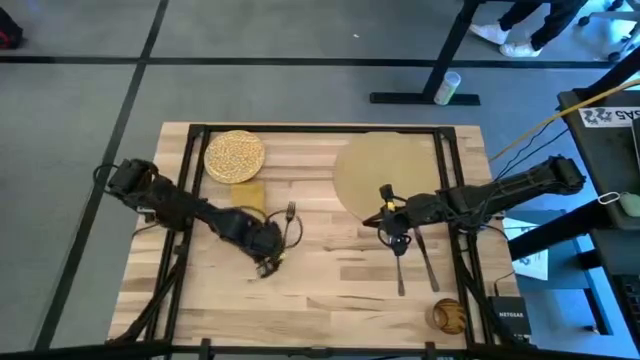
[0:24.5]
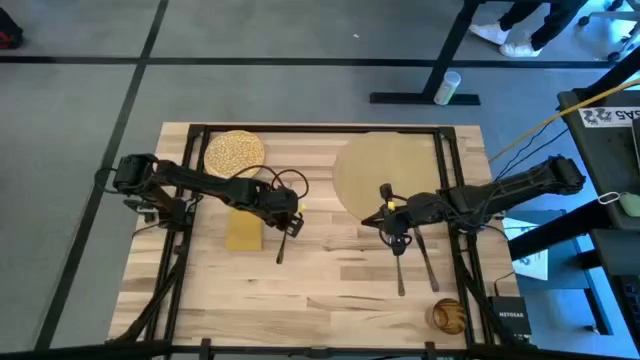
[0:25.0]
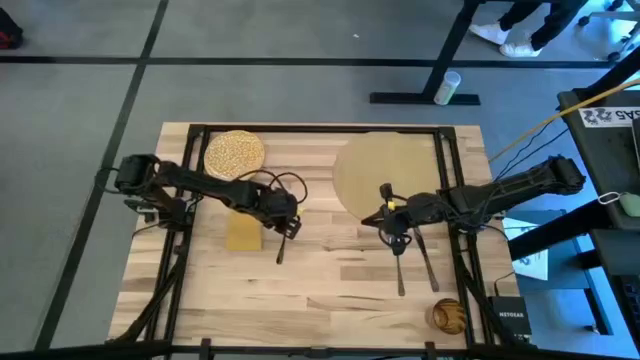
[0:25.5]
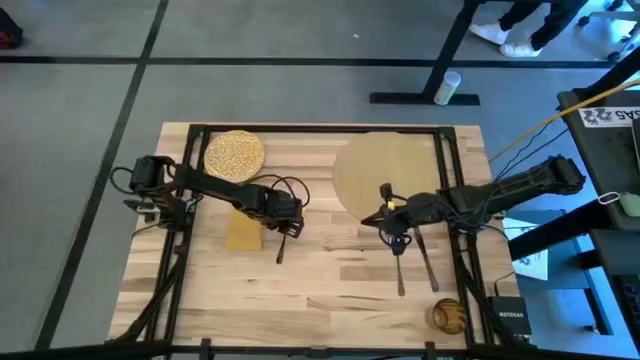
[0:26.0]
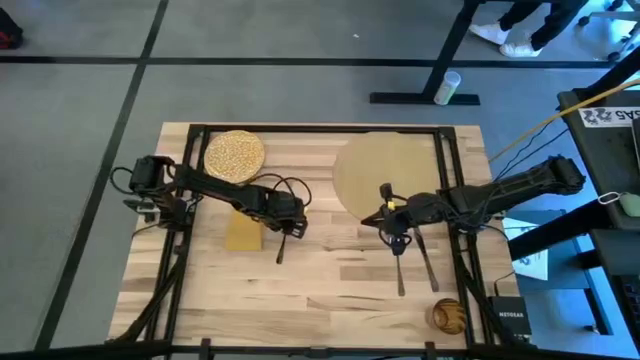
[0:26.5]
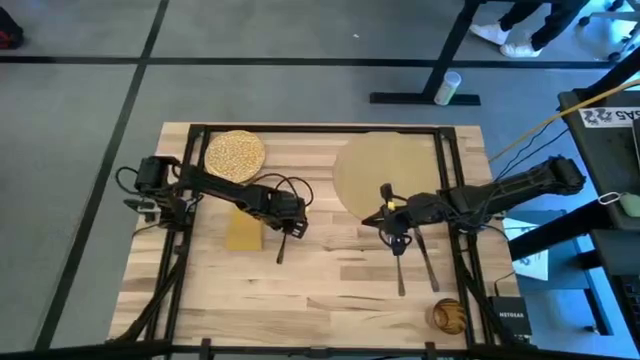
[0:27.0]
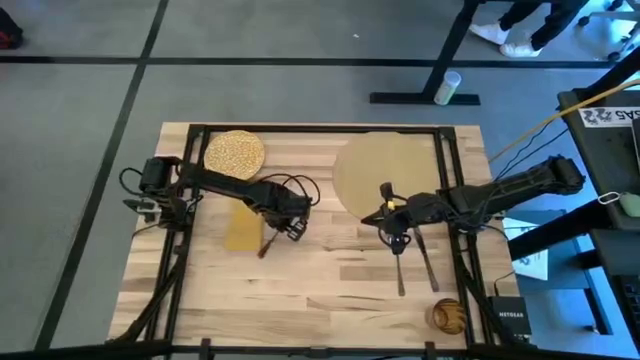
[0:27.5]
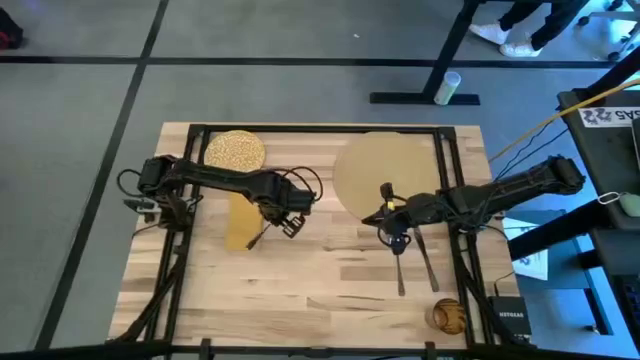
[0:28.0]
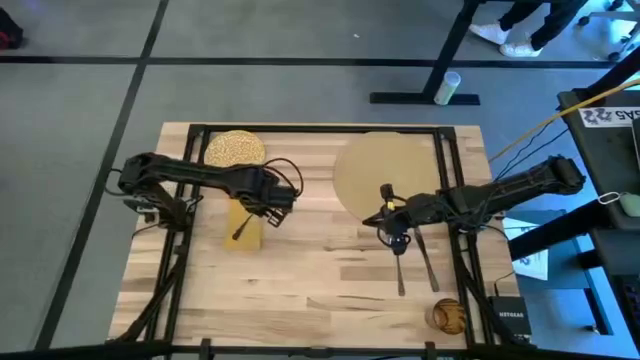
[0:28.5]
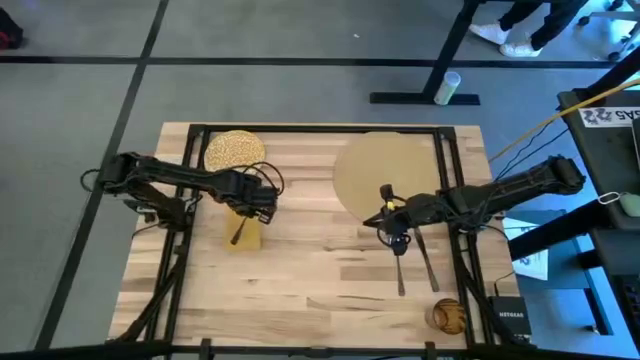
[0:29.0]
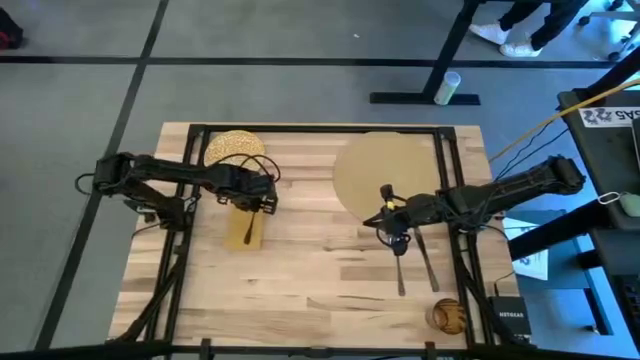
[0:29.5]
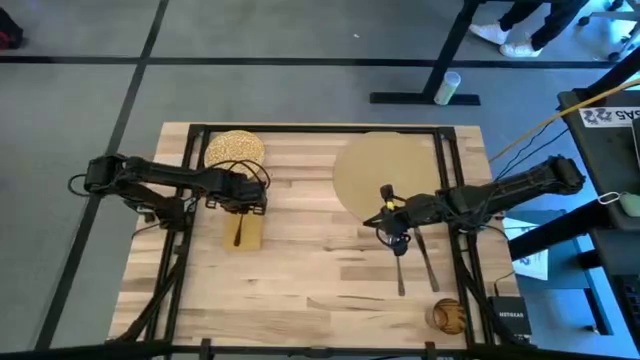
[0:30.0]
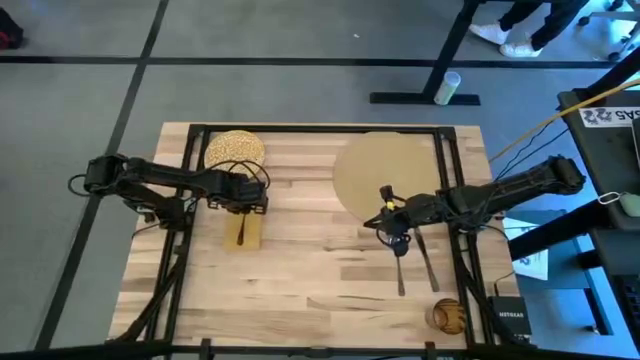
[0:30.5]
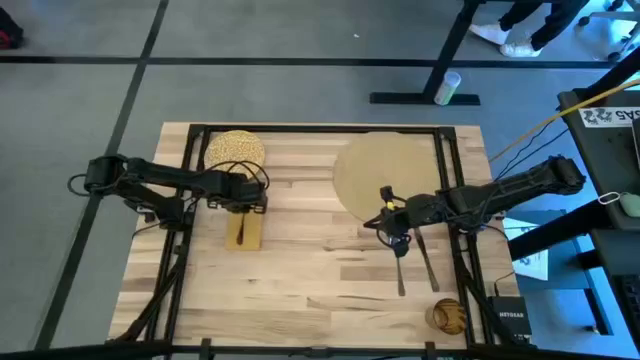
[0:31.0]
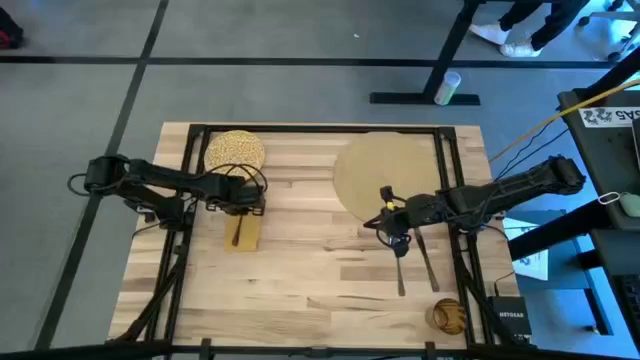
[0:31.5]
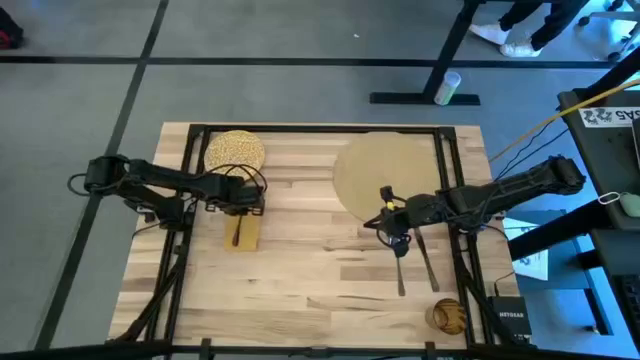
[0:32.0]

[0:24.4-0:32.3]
Task: Set table place
Put the fork on the yellow napkin

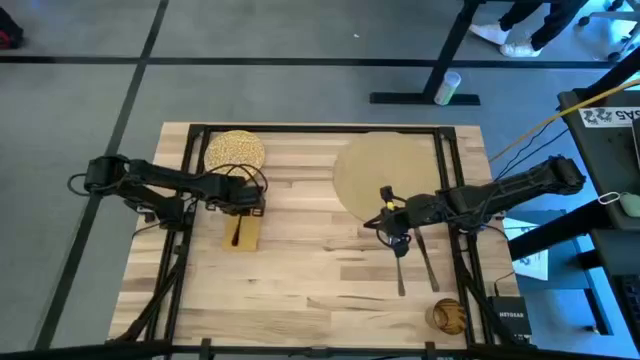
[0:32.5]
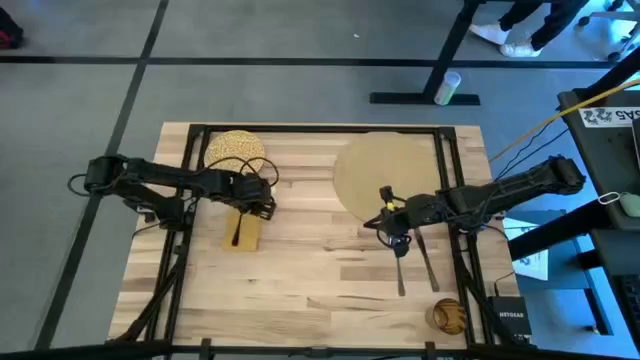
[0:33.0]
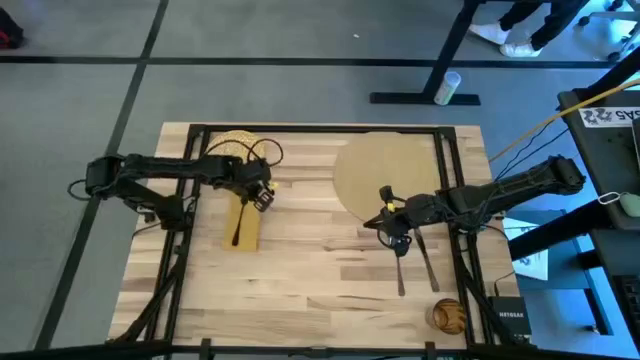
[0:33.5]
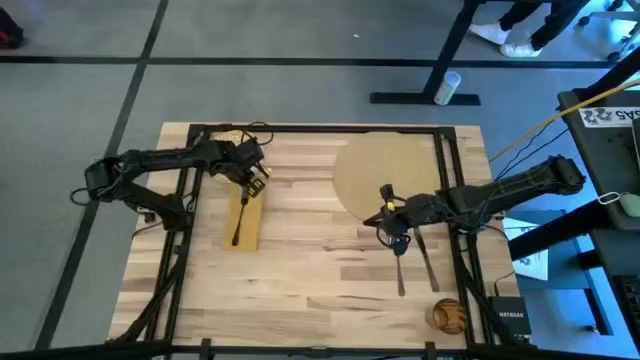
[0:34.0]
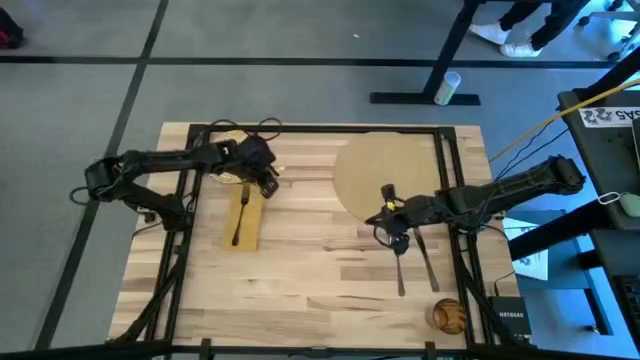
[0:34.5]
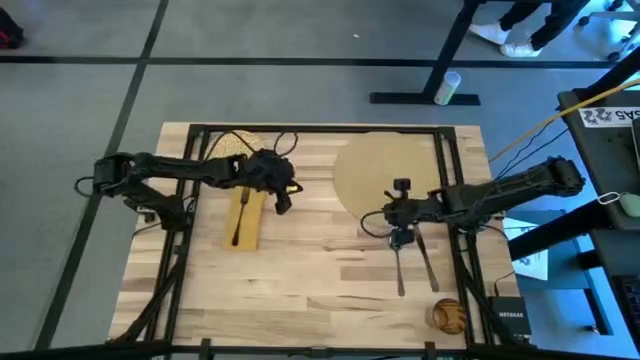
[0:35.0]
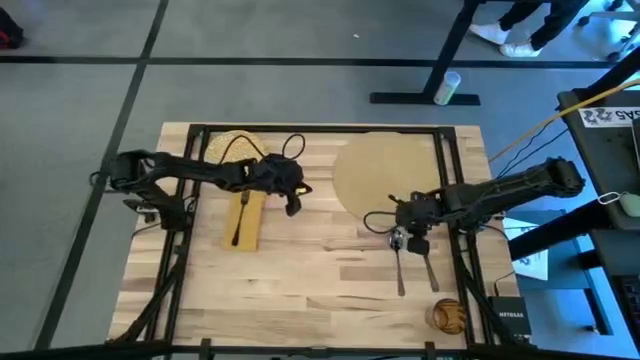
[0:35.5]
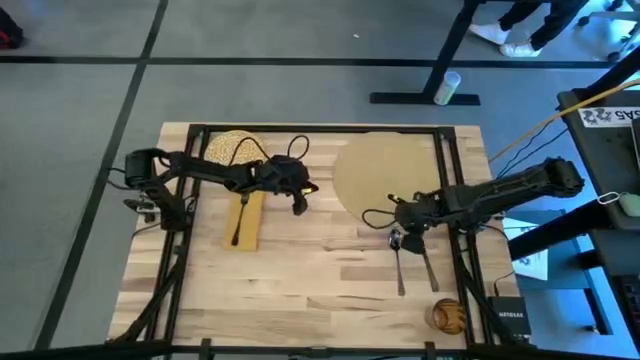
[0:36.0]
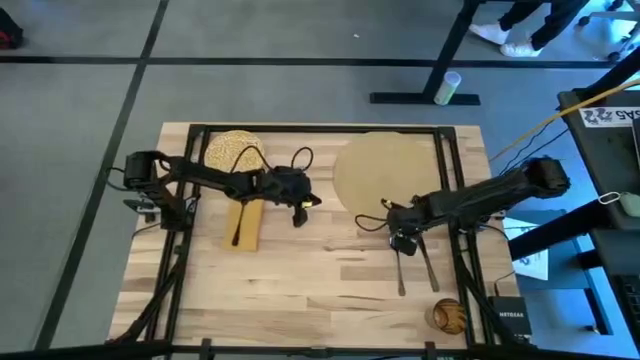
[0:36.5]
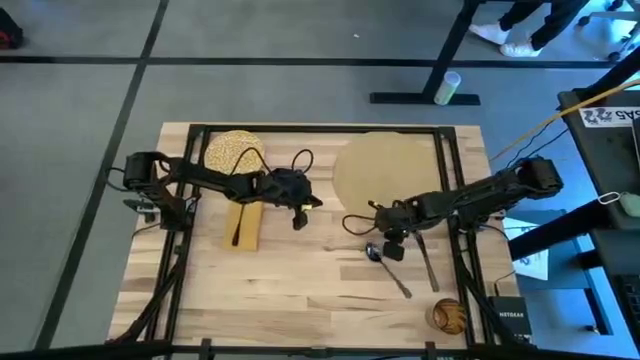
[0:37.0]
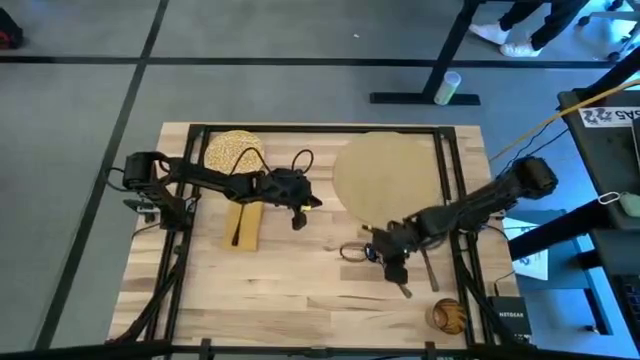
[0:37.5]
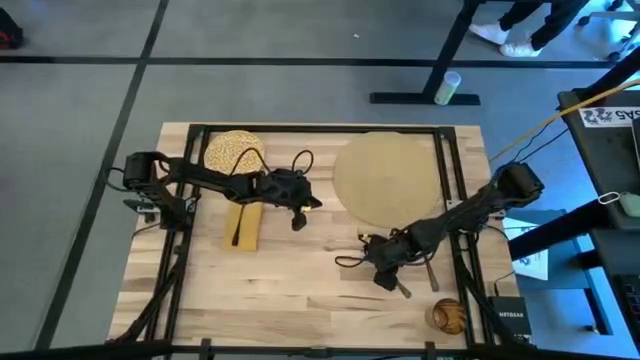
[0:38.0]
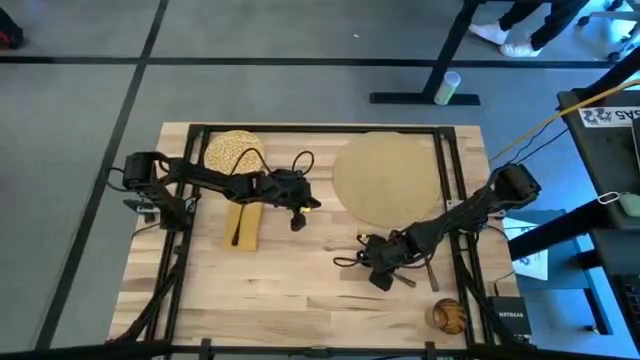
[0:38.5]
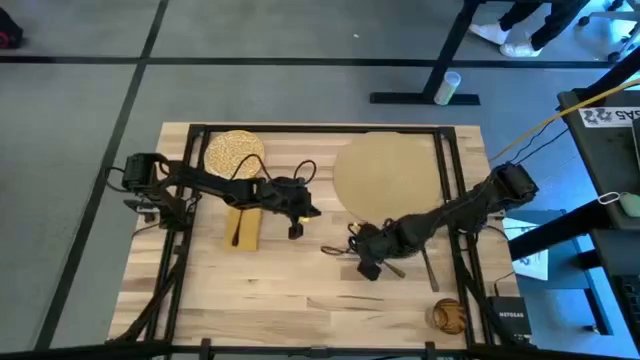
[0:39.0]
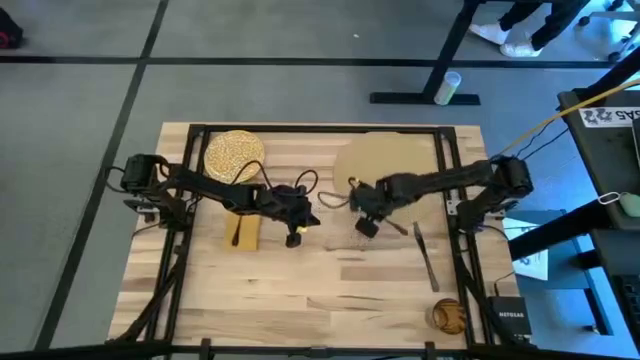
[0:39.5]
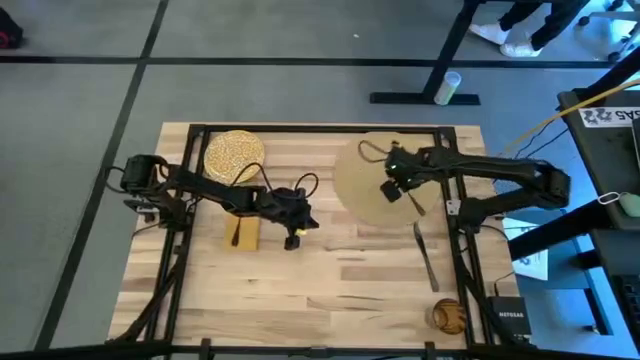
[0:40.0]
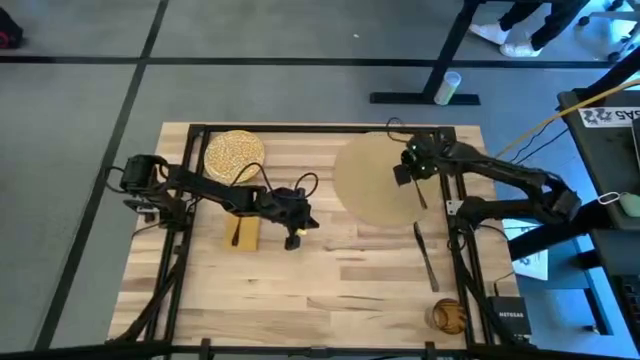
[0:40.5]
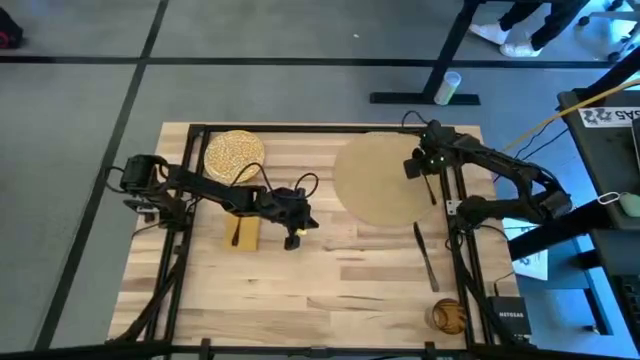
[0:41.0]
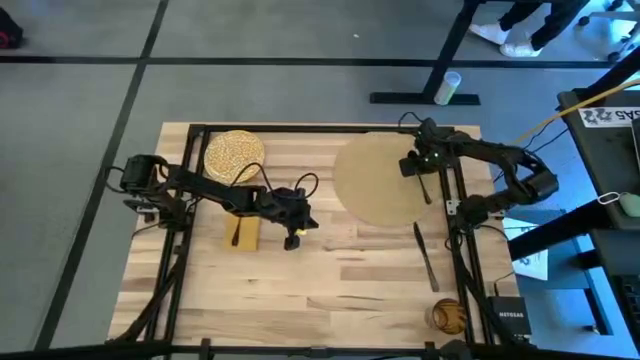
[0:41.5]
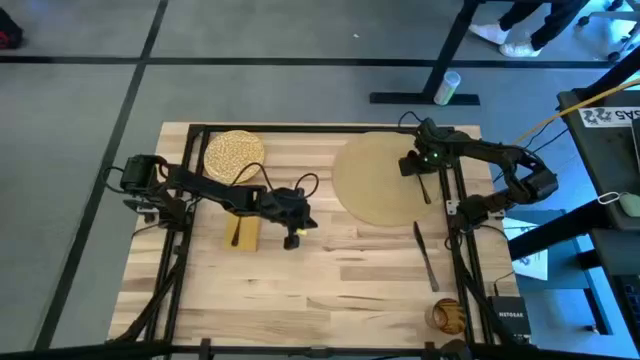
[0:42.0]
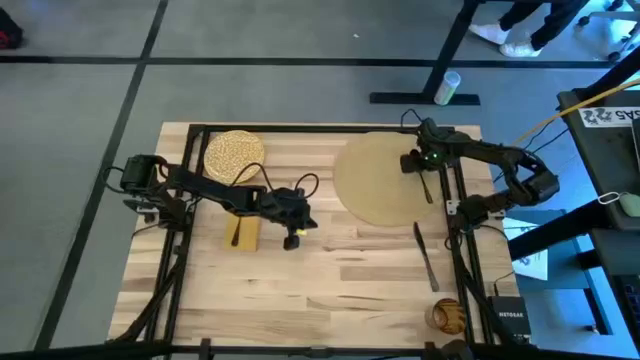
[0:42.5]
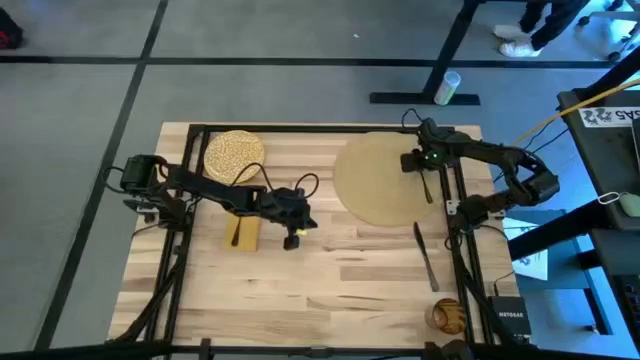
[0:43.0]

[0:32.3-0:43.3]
Put the spoon on the woven mat

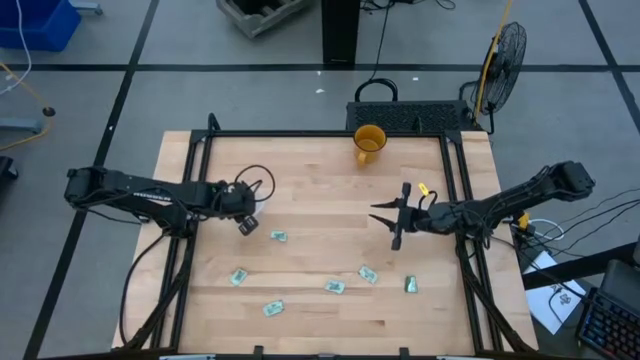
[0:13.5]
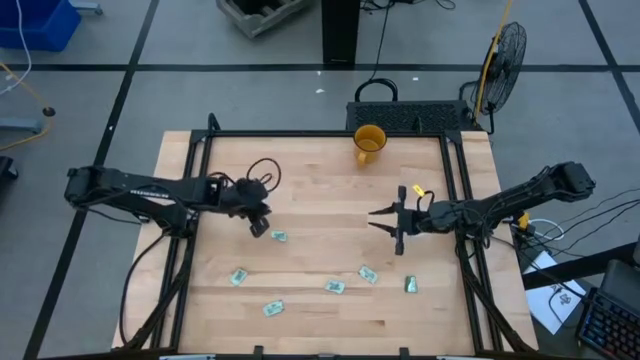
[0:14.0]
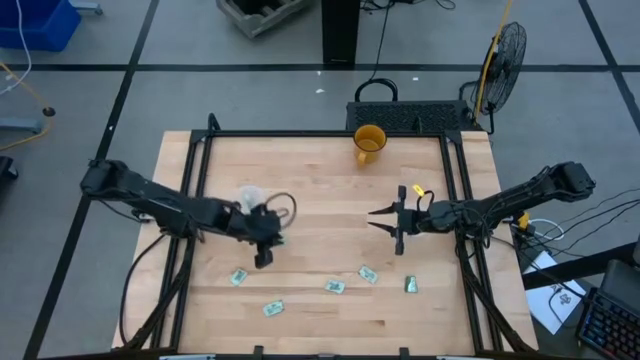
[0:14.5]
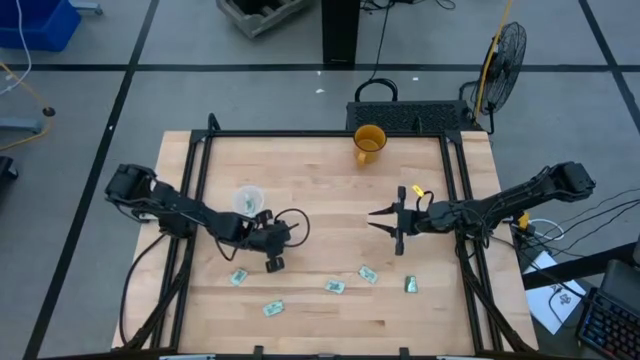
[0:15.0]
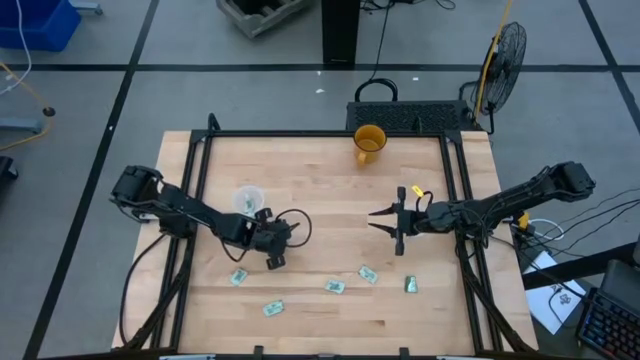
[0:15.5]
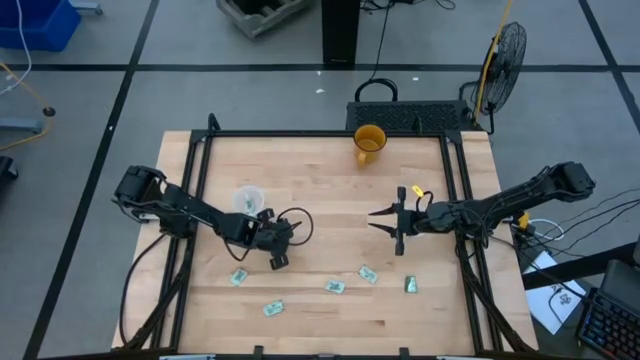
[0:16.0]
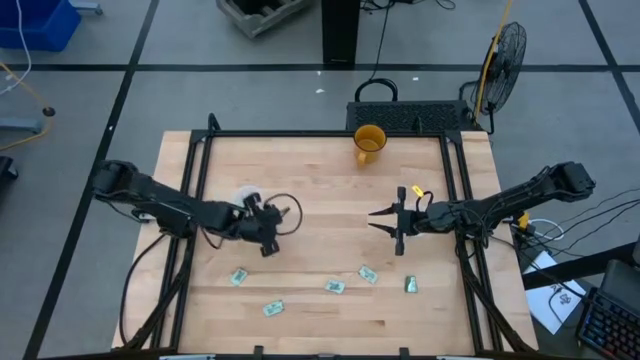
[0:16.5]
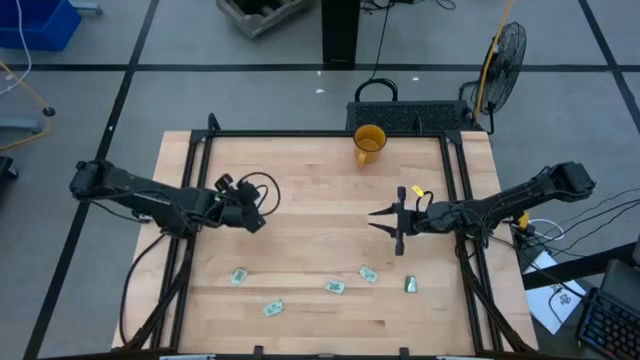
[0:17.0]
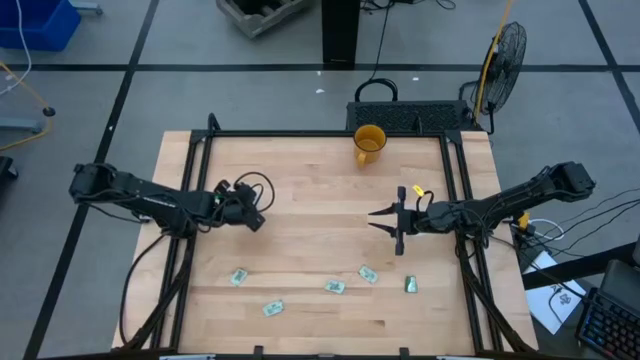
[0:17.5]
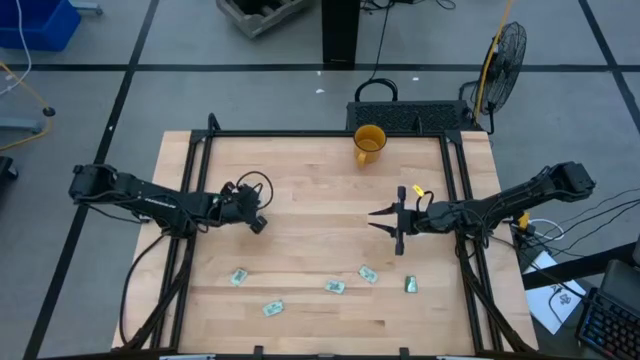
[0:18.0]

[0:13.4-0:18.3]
Task: Pick and place Stevia / Truvia into bins
Put the stevia packet into the left transparent container
